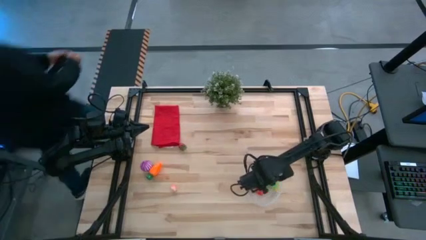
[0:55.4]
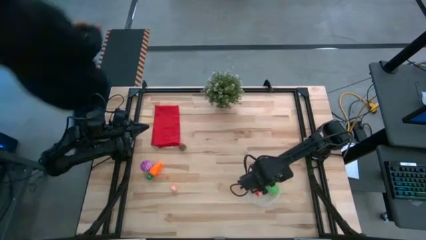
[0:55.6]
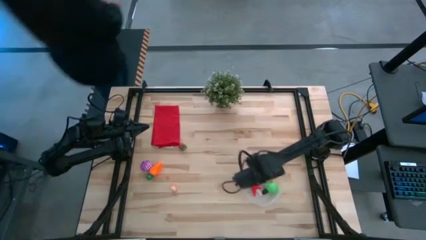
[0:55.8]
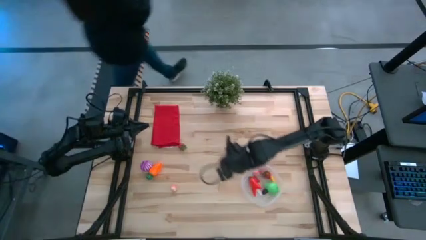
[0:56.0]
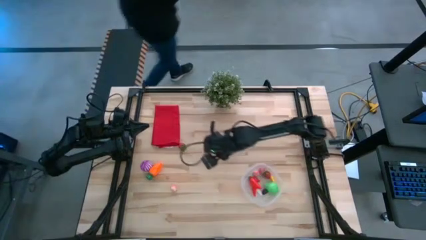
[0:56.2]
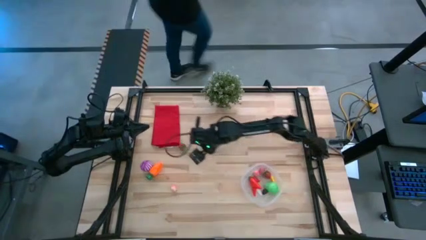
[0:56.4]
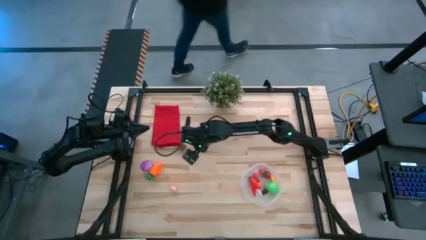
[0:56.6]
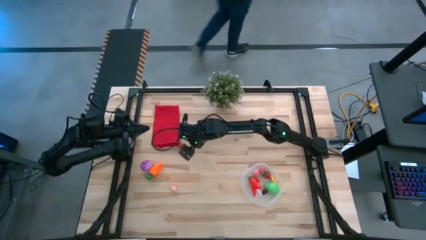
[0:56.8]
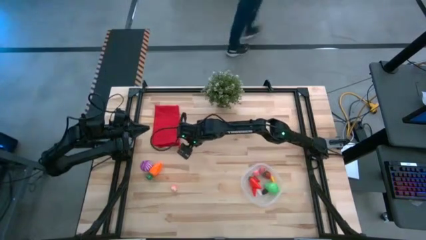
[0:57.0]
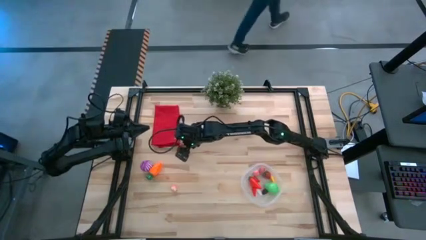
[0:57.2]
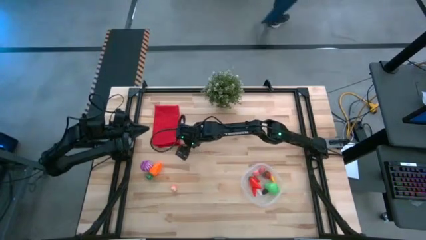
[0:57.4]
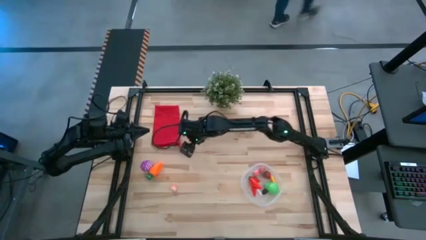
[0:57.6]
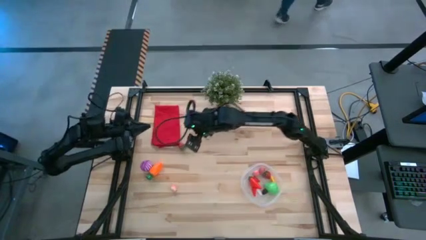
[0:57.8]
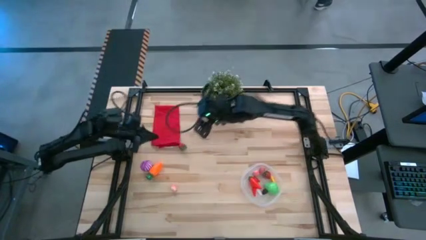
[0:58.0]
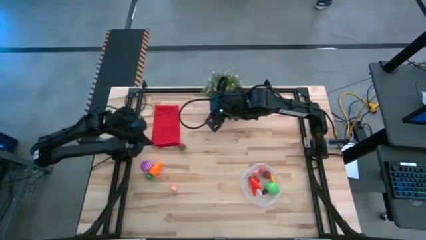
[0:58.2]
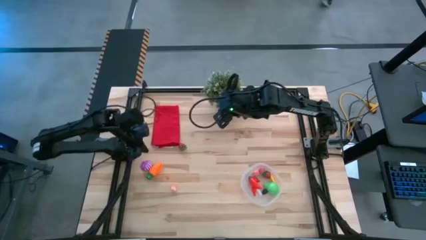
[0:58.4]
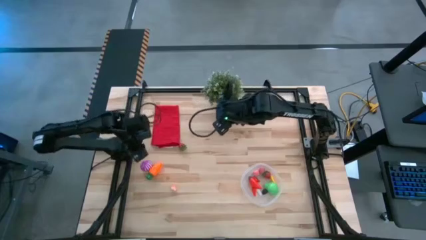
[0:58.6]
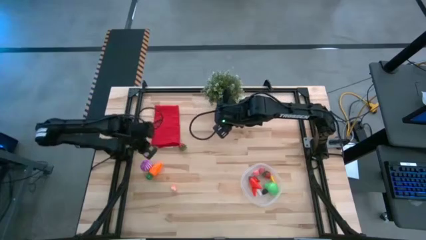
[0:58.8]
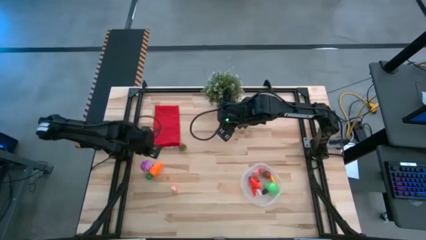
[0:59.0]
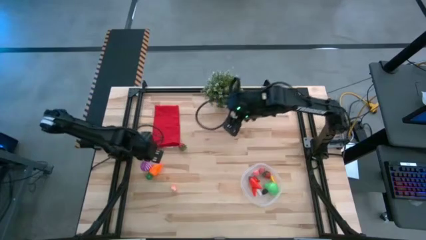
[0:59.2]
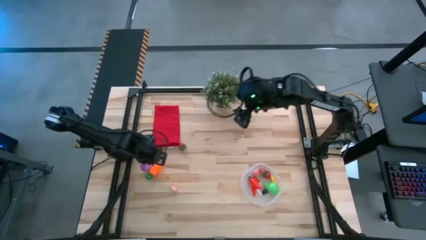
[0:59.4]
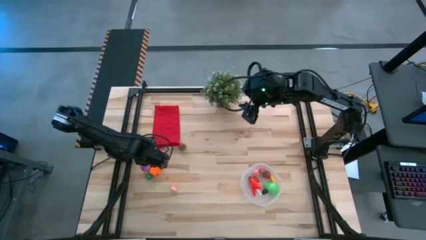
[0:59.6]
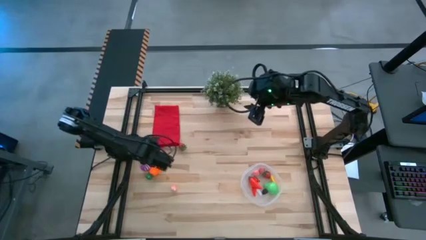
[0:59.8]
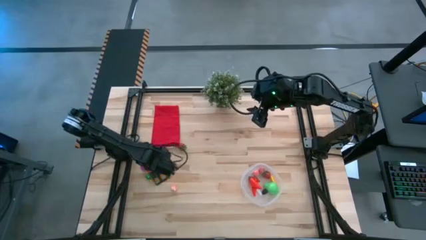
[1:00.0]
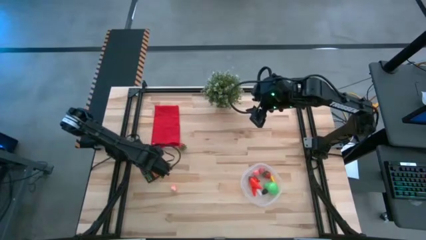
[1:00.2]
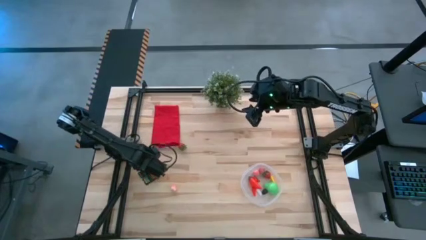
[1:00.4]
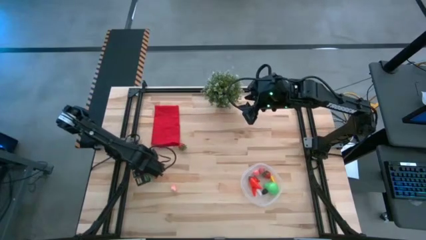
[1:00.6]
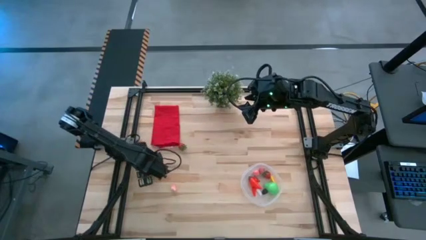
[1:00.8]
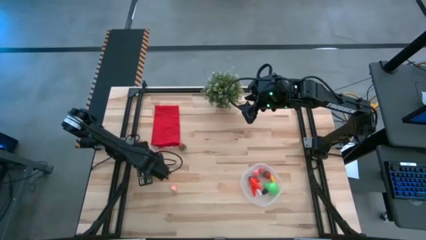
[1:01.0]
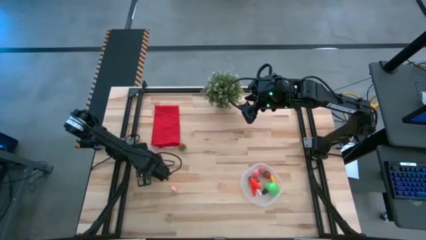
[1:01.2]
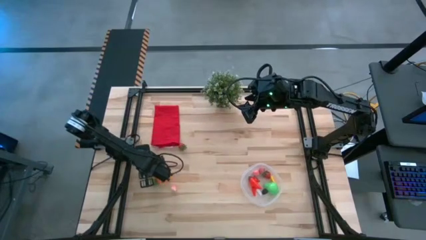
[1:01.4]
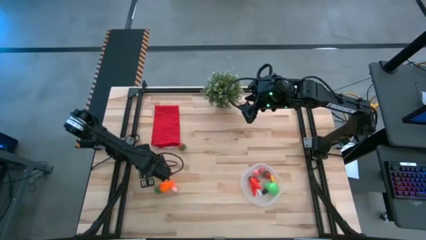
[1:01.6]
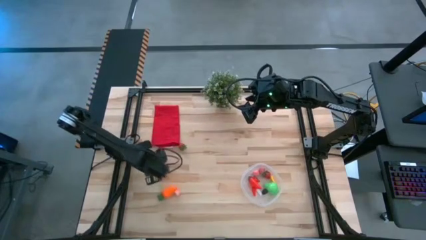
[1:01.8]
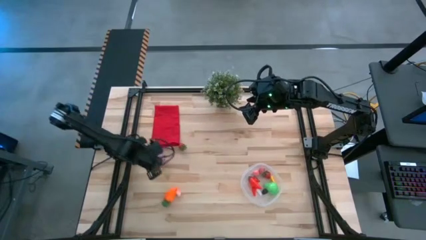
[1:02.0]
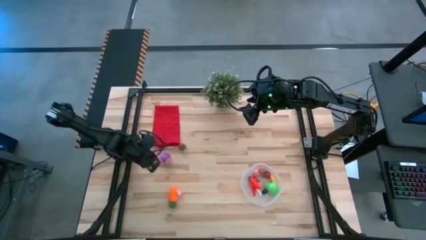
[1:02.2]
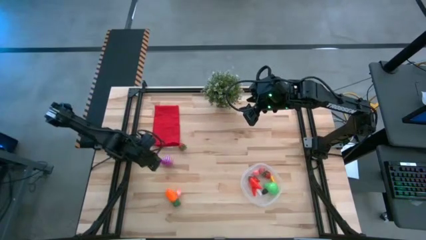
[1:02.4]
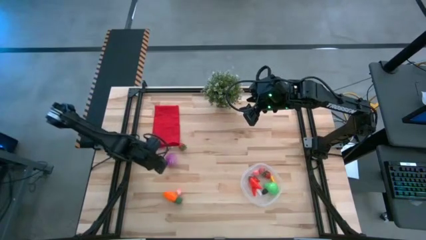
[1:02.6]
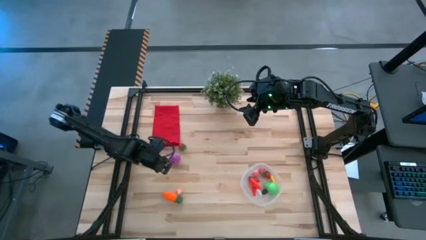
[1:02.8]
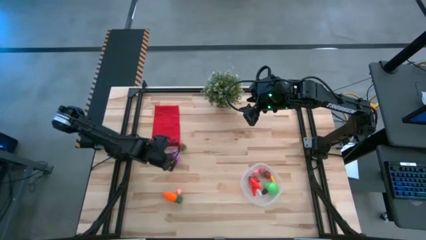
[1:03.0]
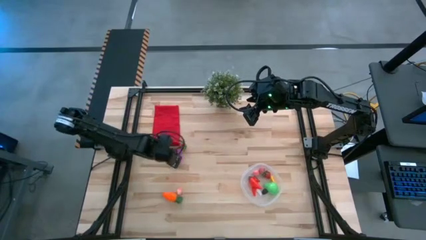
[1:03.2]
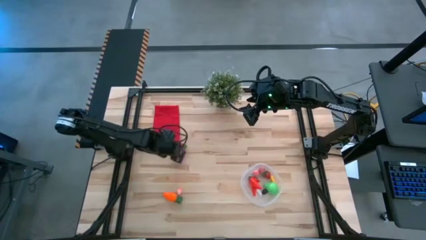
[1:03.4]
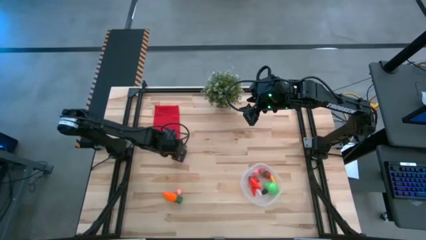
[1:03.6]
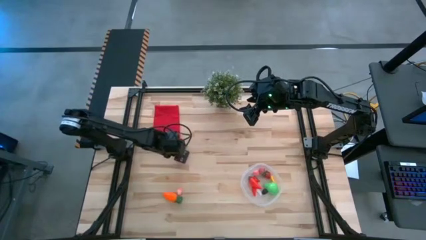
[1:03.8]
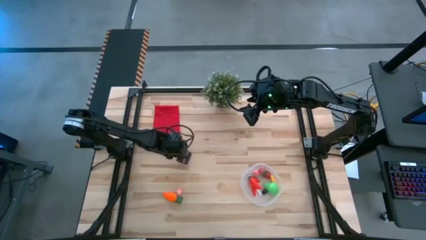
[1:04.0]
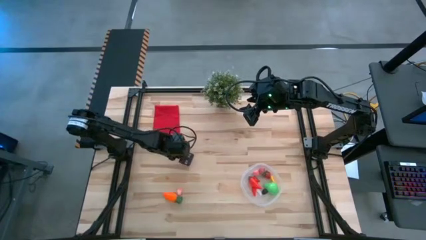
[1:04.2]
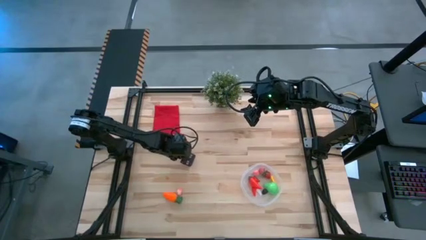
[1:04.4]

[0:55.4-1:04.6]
Task: Pick and placing Produce into tupperware
Put the purple onion into the transparent bin

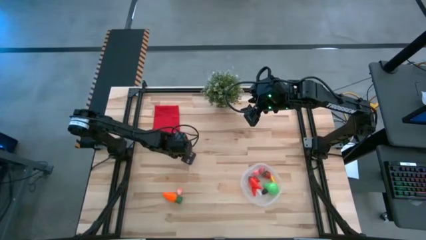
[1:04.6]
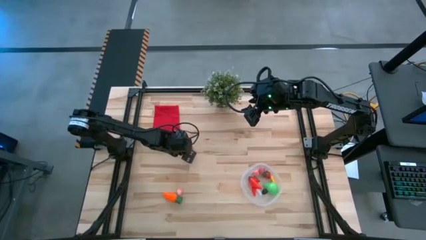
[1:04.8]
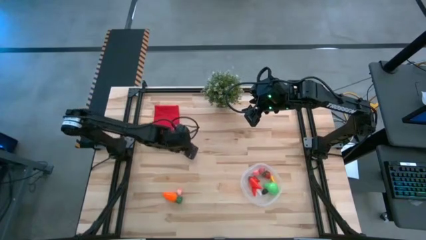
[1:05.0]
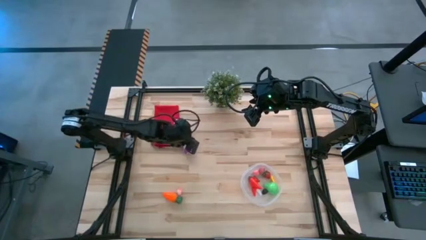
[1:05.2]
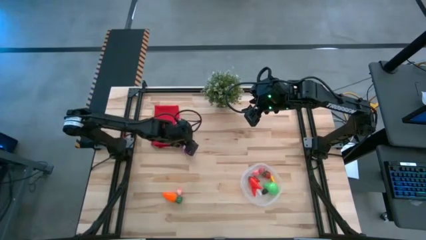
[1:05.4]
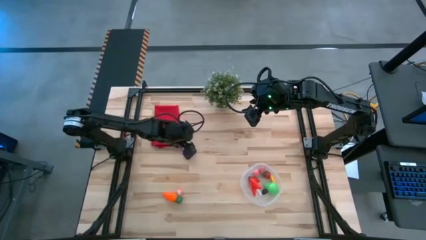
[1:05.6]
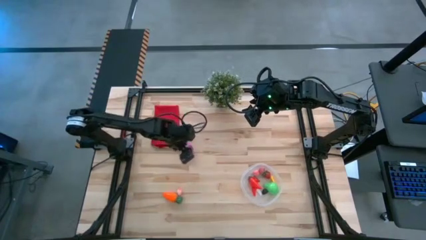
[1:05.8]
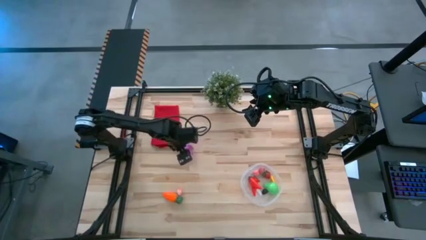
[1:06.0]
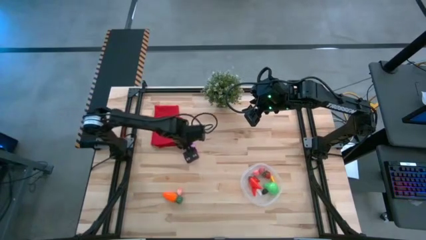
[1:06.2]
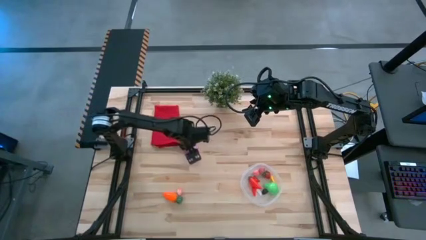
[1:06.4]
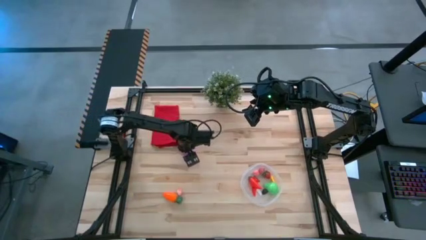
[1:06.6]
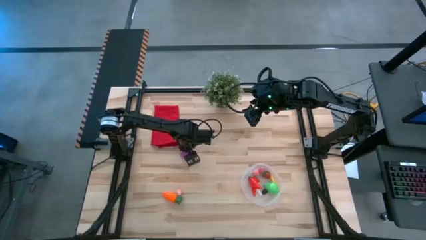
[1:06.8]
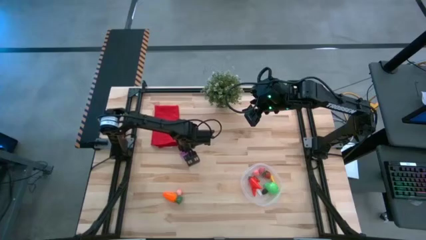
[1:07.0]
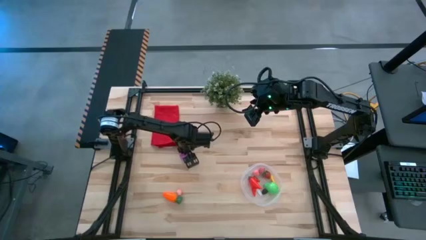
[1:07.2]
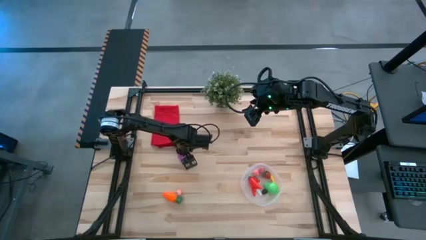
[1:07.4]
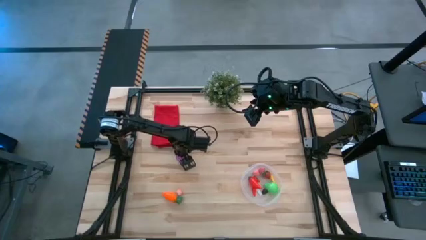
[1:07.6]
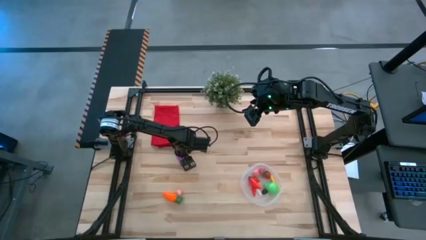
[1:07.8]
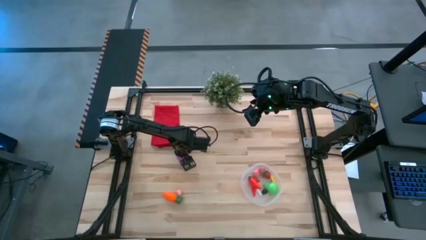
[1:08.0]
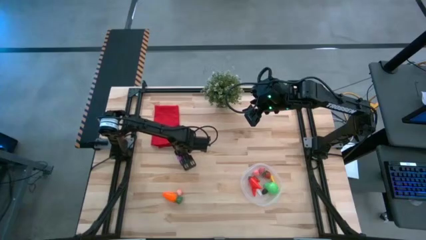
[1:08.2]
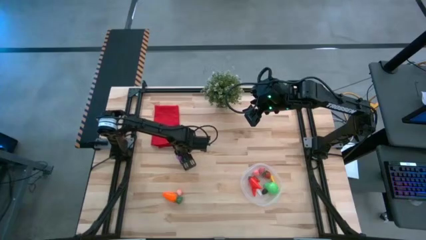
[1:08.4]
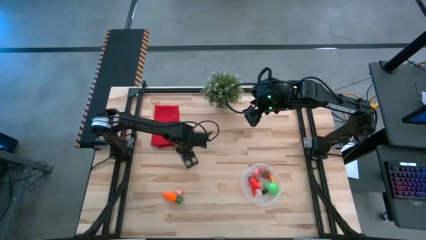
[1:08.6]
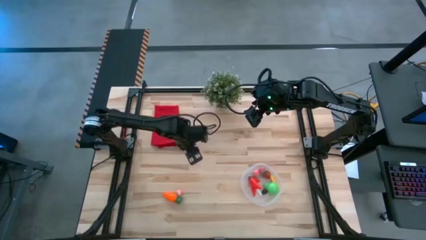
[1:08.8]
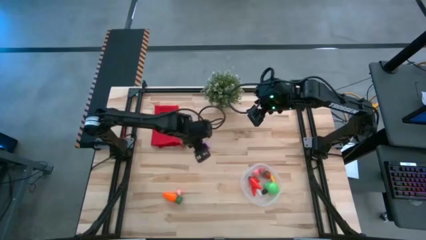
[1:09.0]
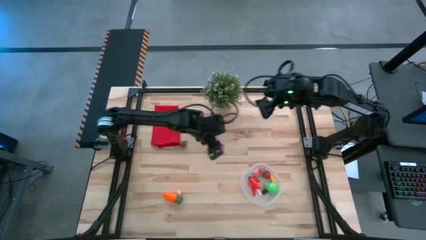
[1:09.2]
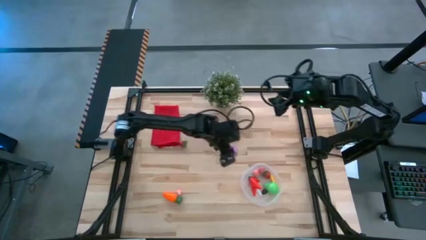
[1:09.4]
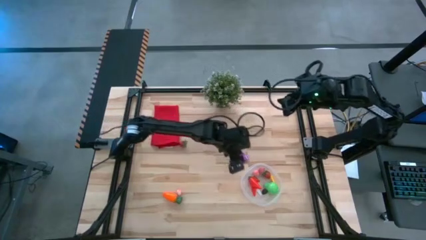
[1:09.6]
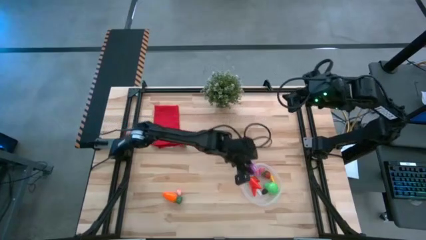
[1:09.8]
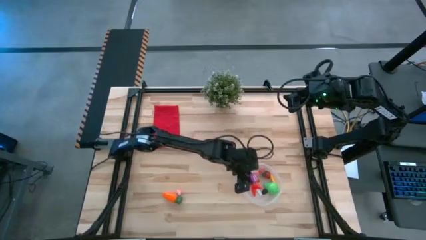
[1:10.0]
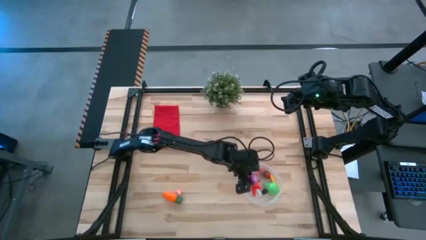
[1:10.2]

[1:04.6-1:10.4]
Put the purple onion into the transparent bin
